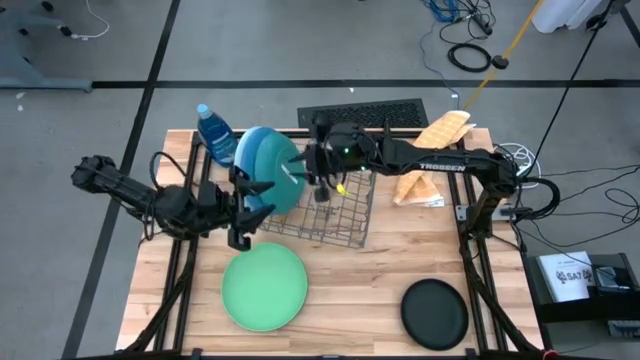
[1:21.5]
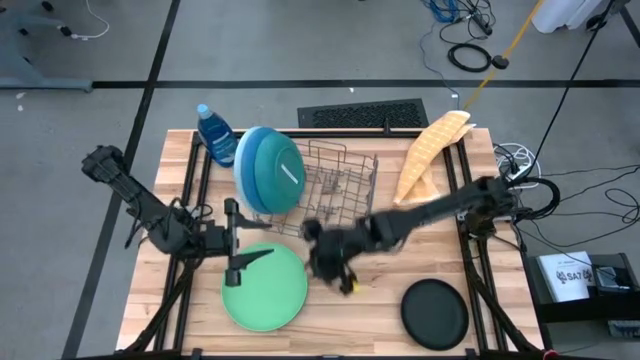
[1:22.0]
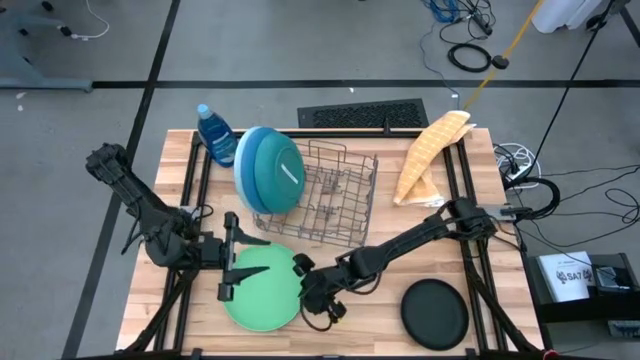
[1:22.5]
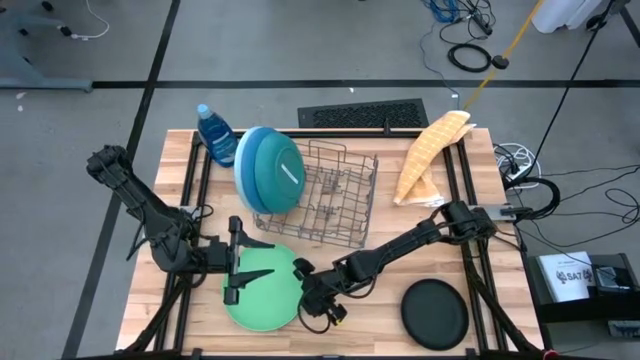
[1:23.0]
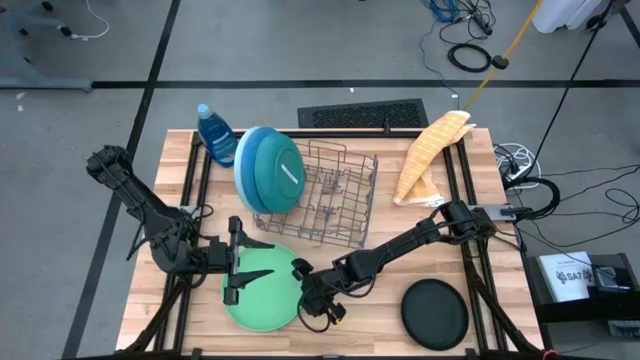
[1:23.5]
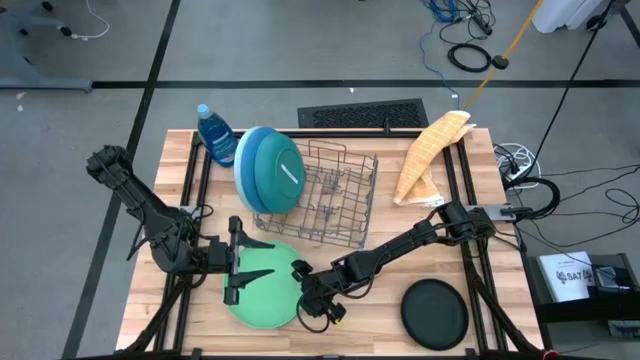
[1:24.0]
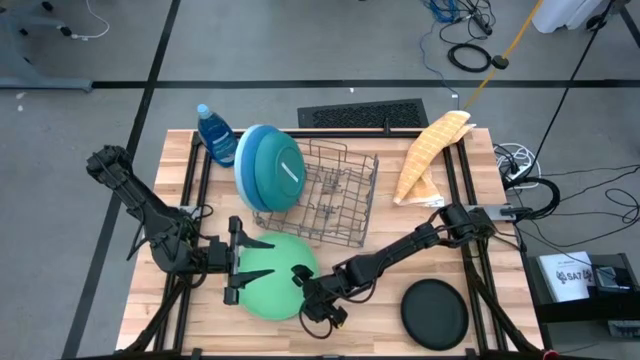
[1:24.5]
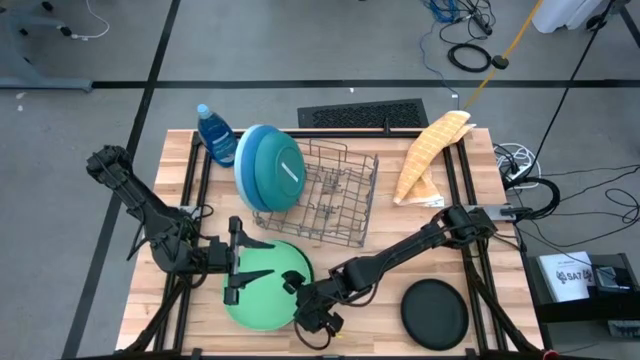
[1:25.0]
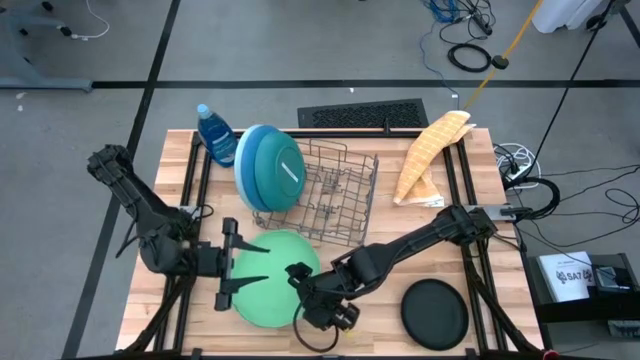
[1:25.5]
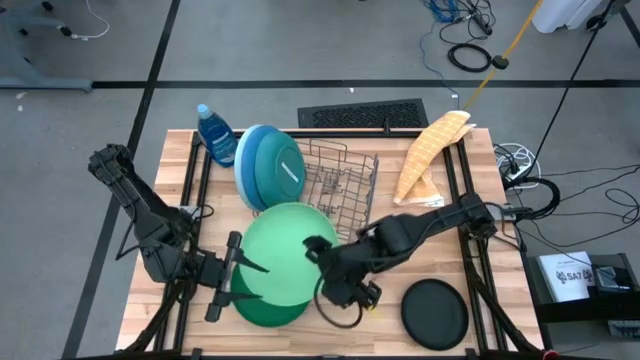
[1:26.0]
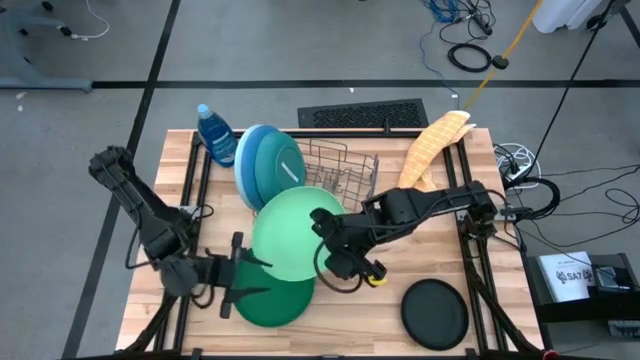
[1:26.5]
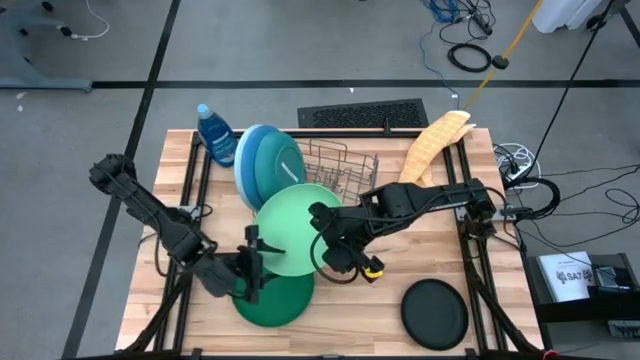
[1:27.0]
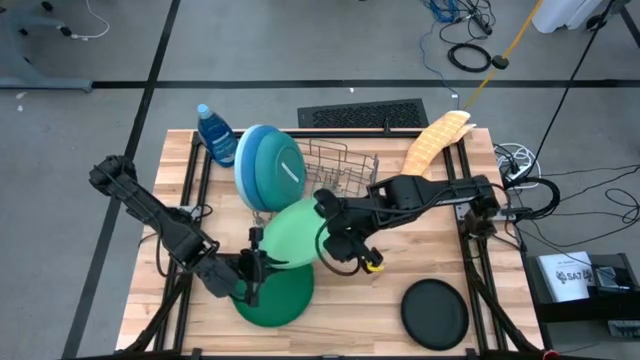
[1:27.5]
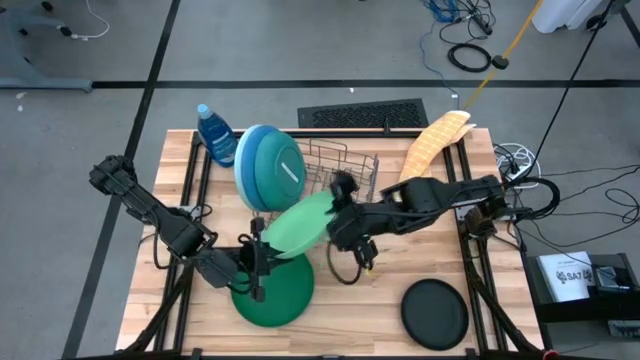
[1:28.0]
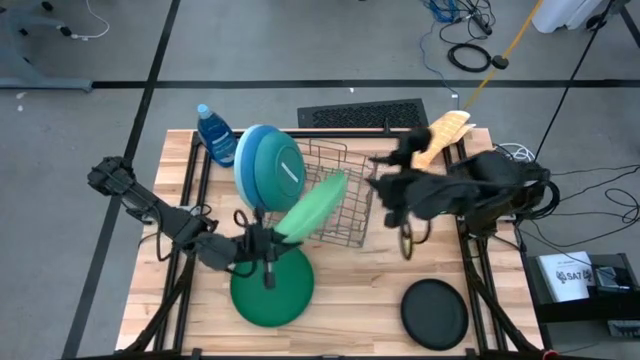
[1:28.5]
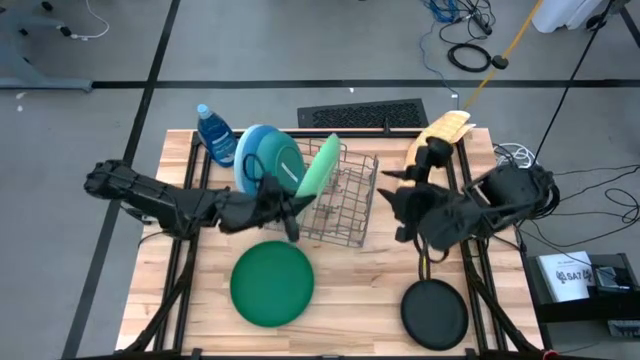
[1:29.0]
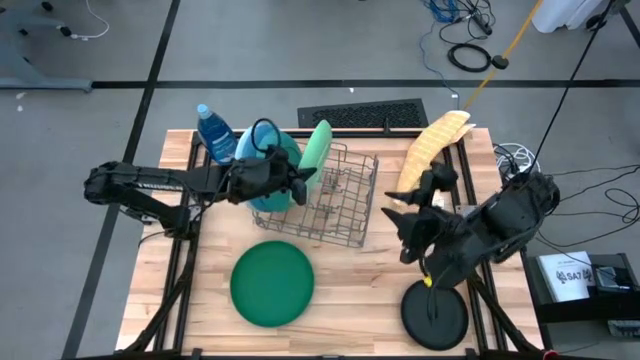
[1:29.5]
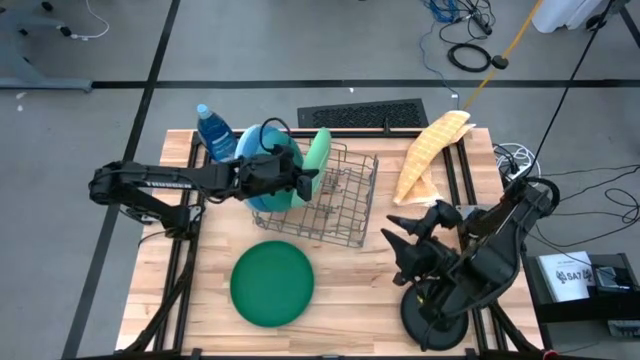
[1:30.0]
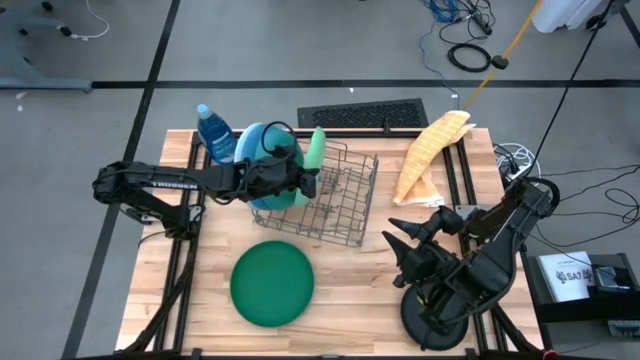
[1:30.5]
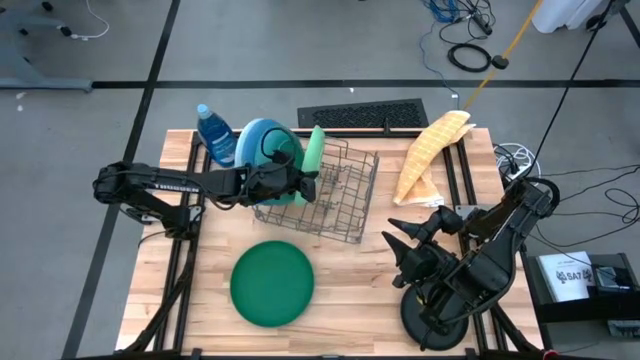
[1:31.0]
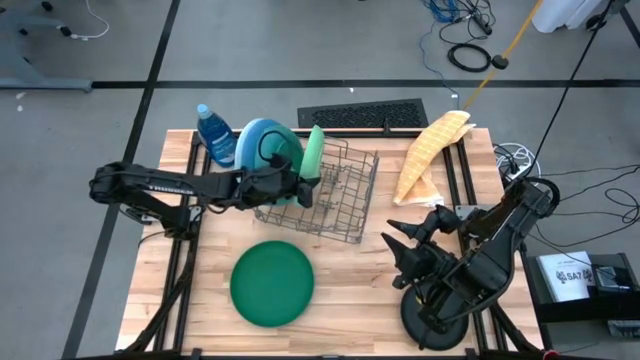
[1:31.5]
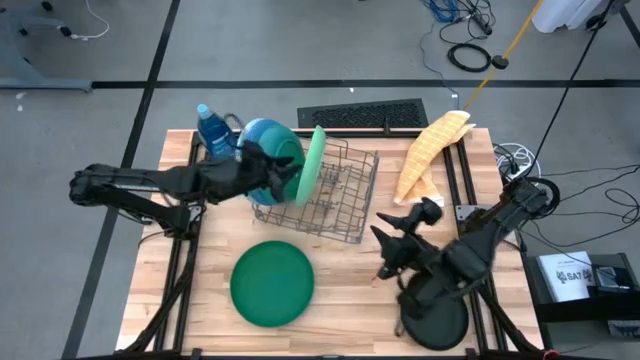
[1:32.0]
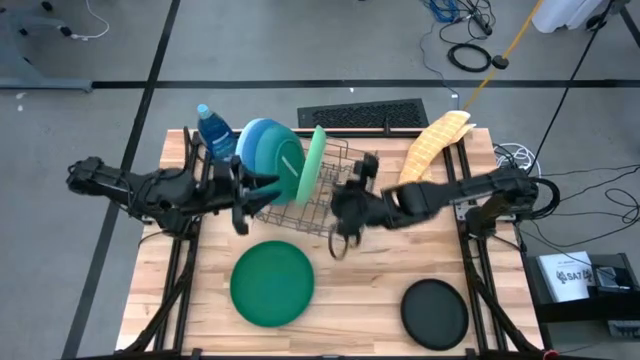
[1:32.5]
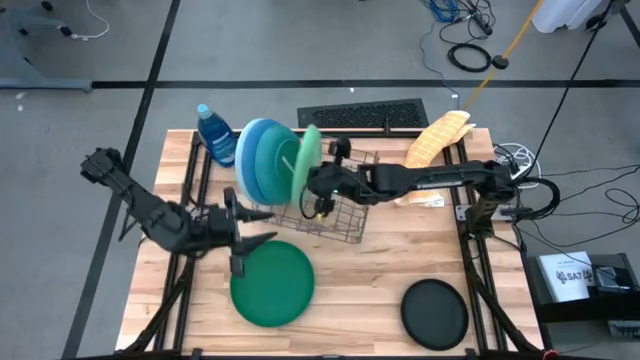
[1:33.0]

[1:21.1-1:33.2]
Task: Sort dishes
Put the light green plate into the dish rack

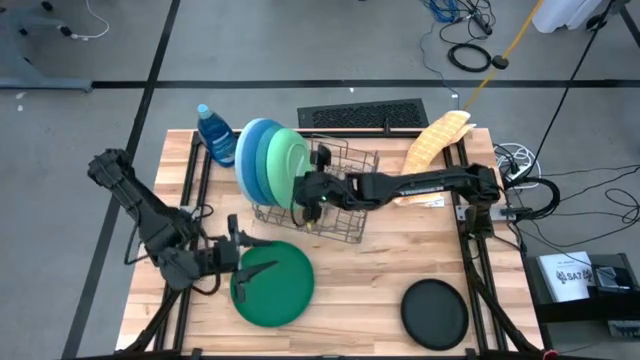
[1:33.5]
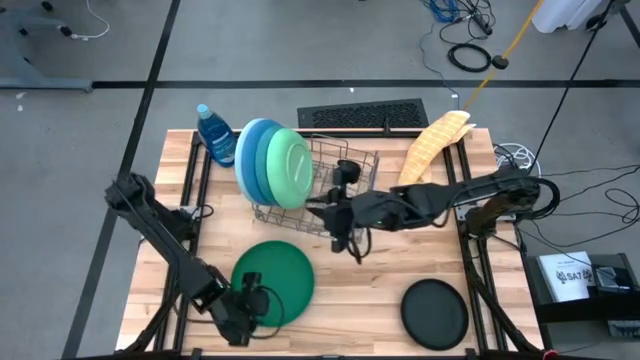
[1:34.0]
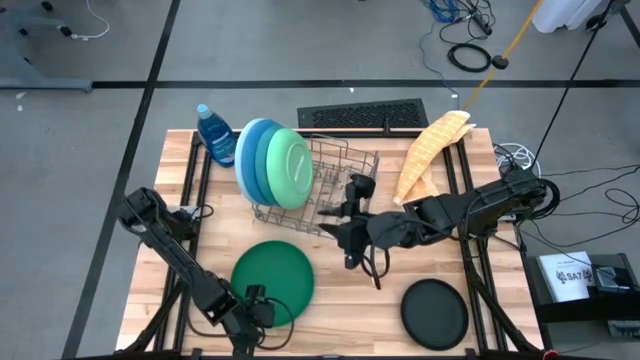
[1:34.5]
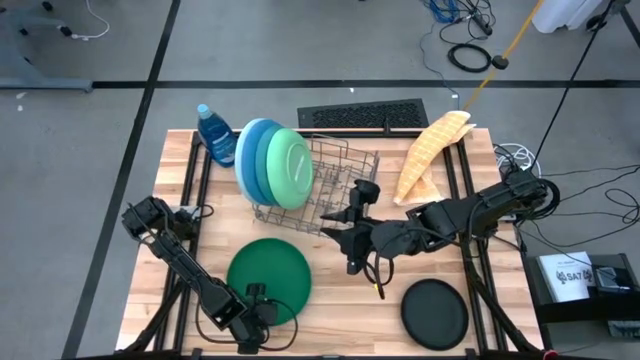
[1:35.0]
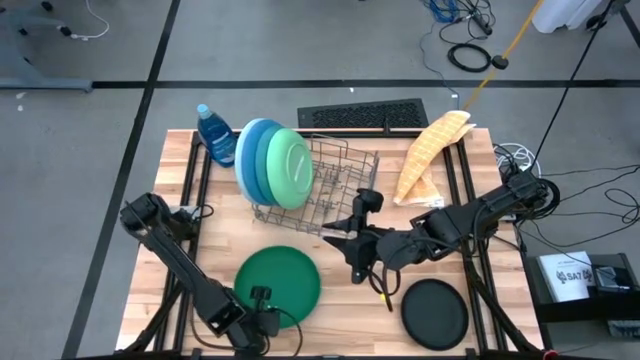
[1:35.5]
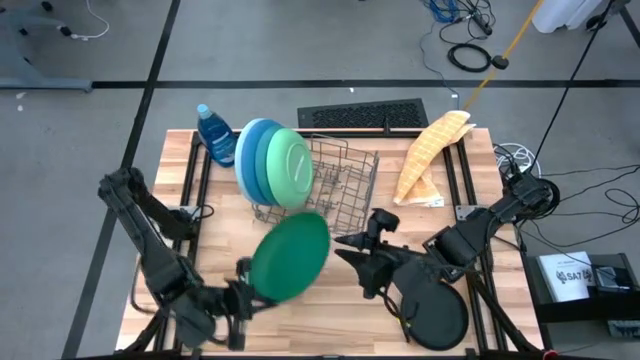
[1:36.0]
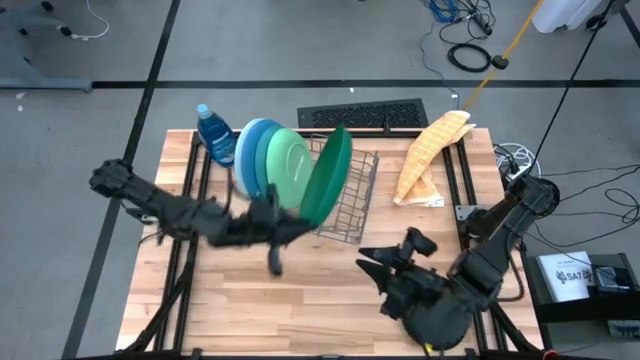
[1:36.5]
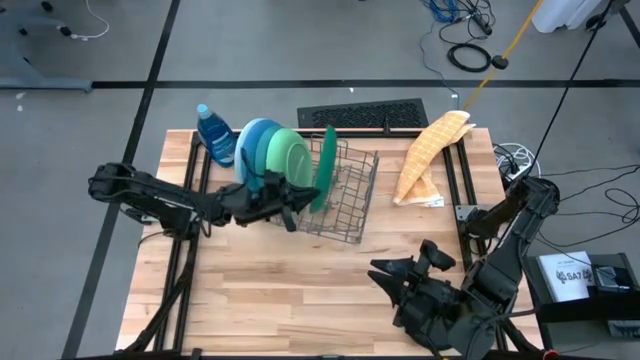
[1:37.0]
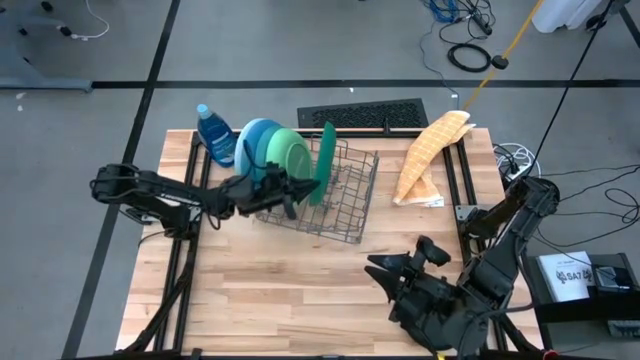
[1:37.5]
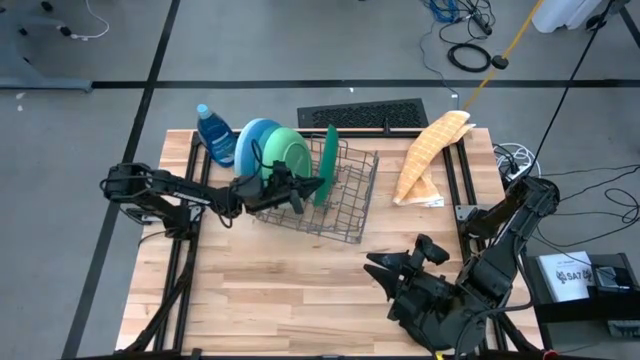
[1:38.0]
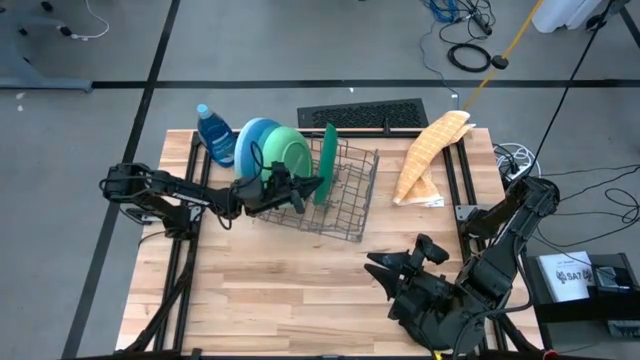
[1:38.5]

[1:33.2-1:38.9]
Put the dark green plate into the dish rack

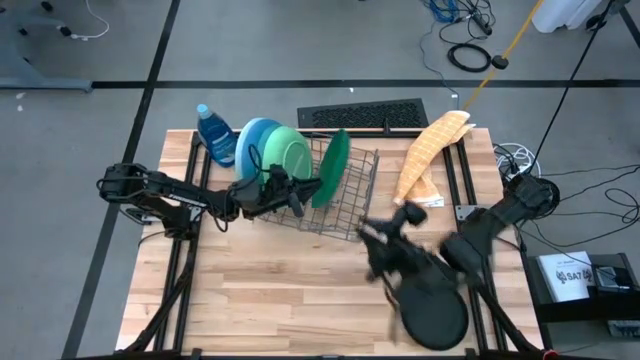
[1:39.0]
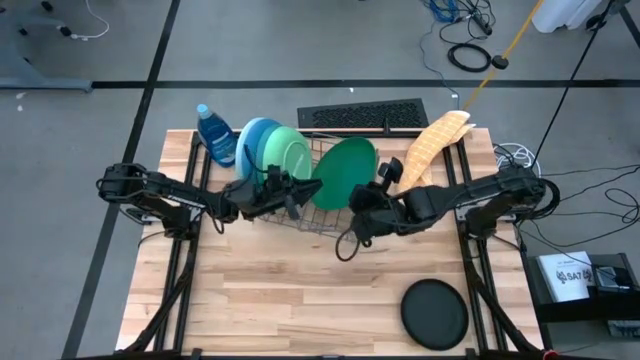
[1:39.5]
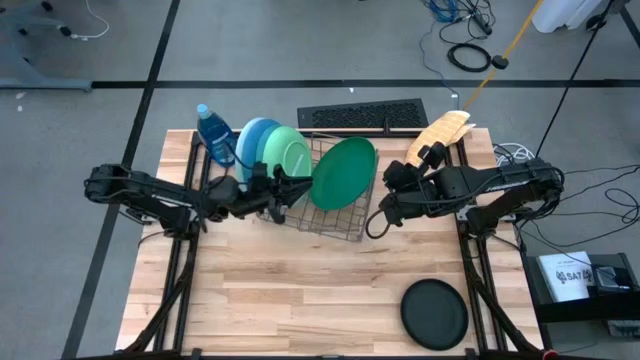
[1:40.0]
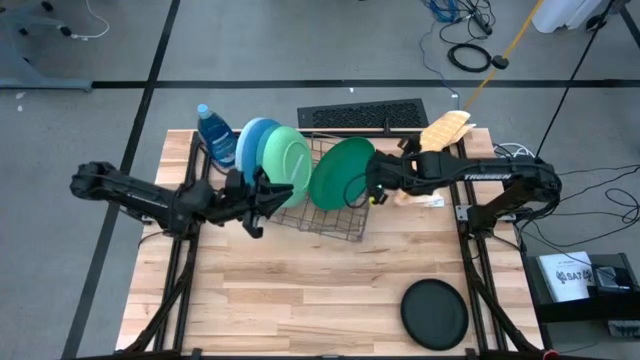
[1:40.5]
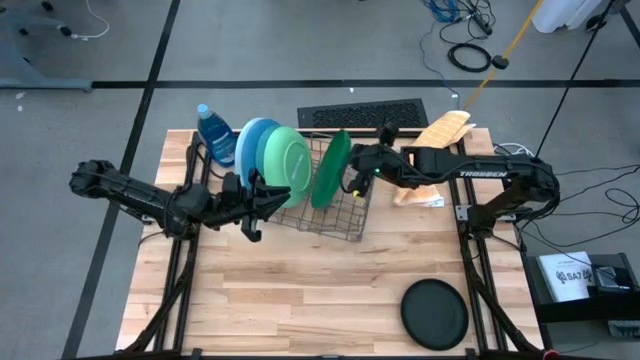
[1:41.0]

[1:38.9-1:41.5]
Put the green plate into the dish rack

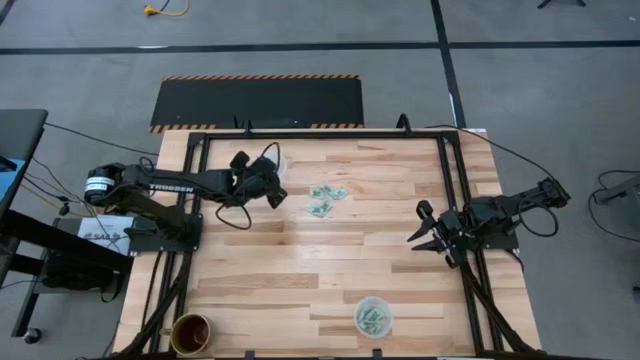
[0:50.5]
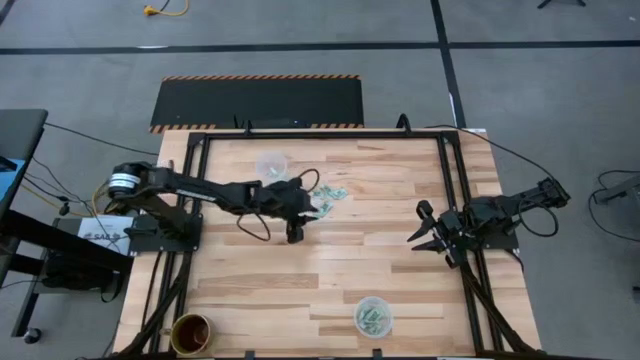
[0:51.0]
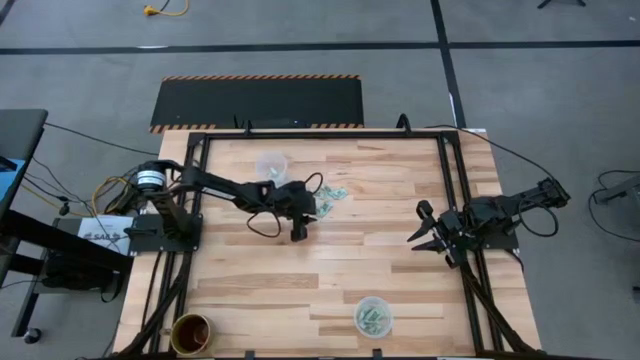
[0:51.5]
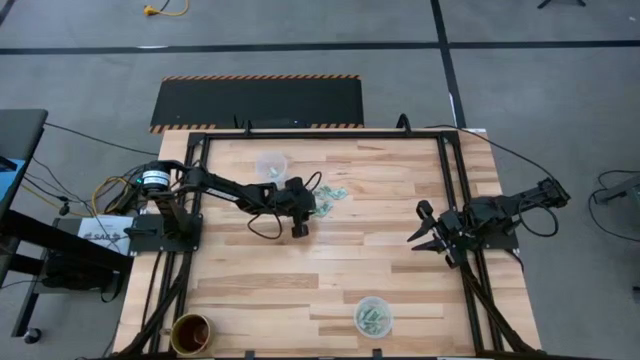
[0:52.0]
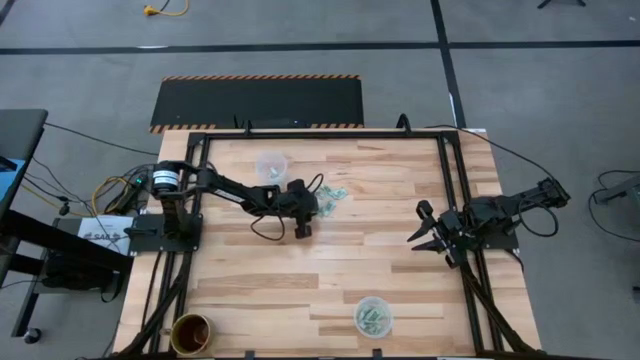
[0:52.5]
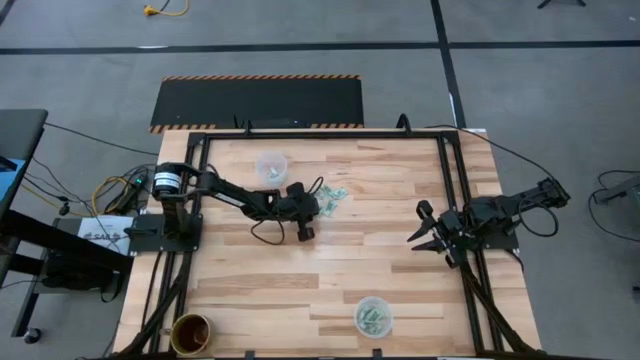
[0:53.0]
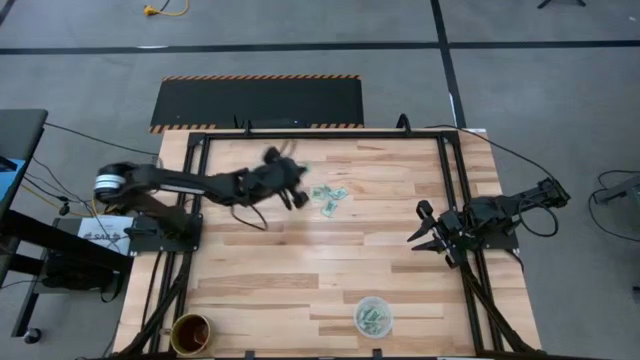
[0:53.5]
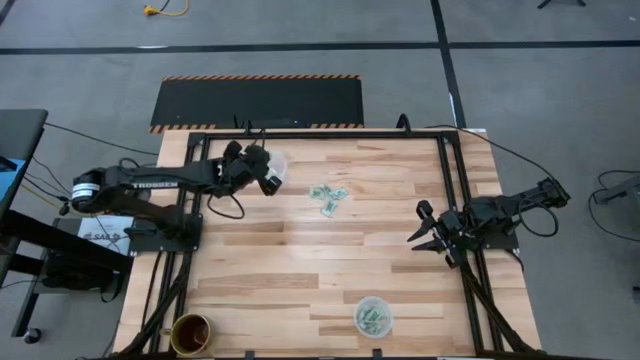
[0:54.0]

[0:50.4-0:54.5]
Task: Pick and place Stevia / Truvia into bins
Put the white stevia packet into the top transparent container
